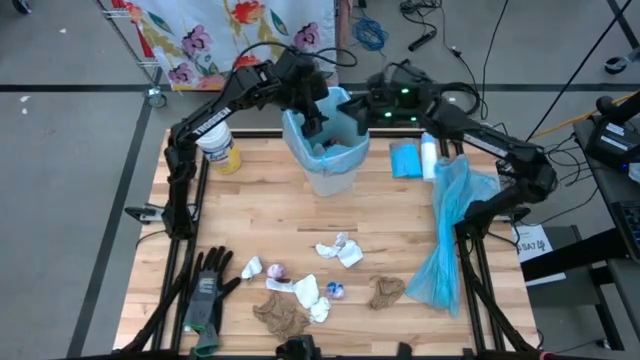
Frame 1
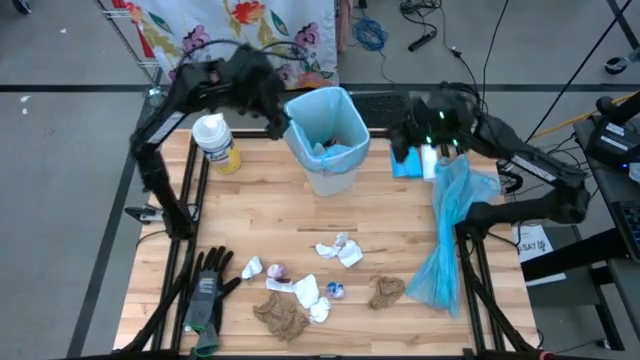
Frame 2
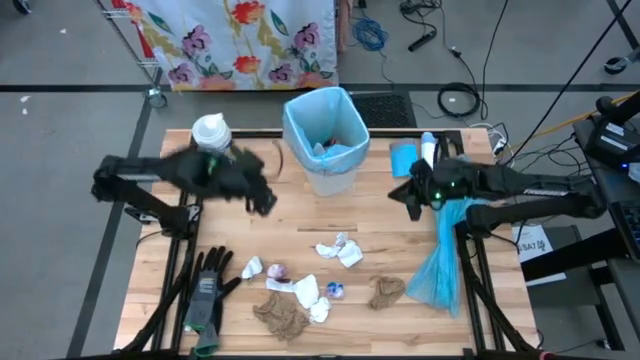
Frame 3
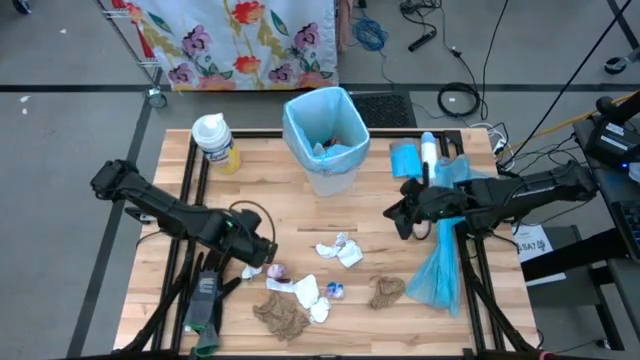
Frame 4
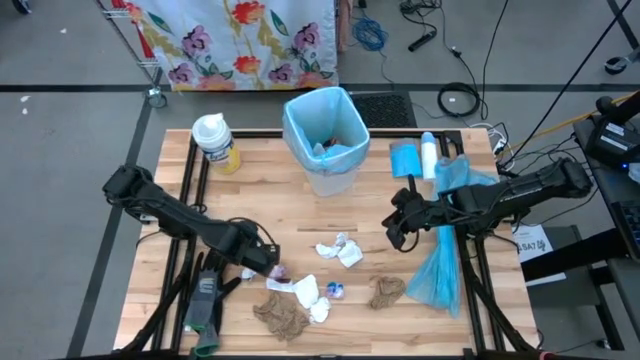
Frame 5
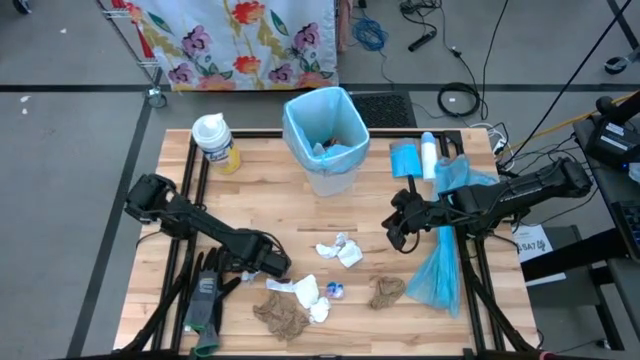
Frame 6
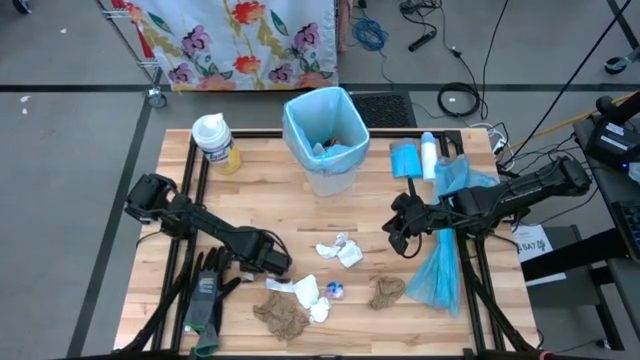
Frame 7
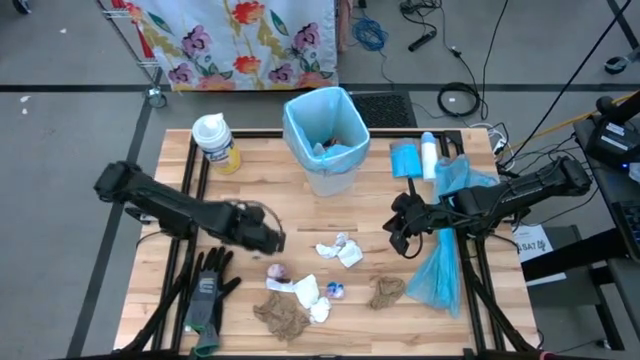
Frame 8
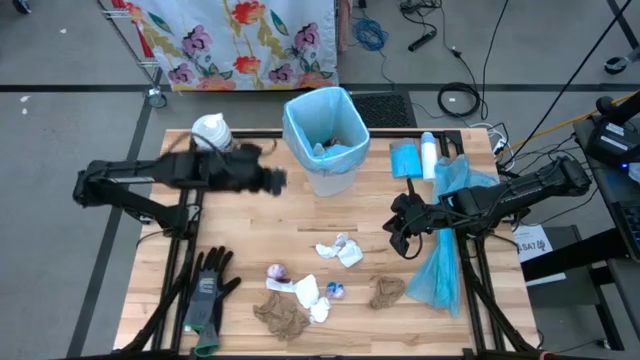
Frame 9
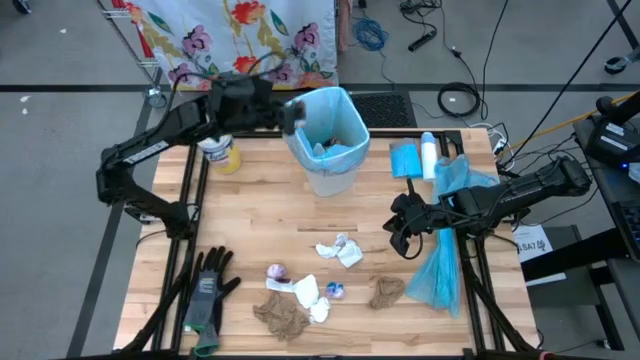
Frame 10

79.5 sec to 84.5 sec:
Task: place trash/remove bag and relplace
Put the white black paper into the trash bin

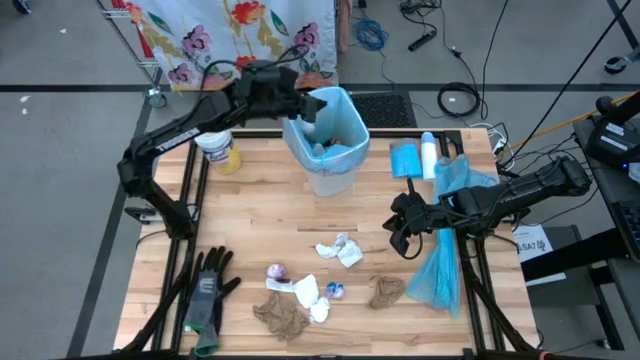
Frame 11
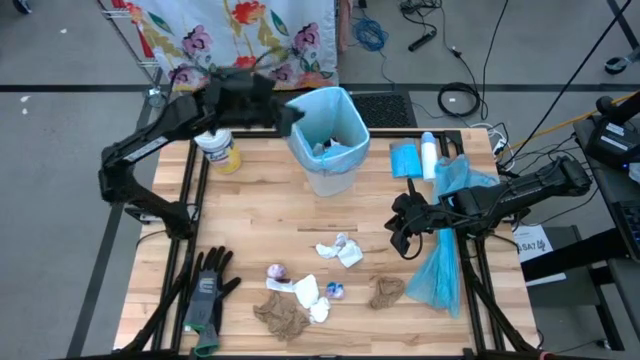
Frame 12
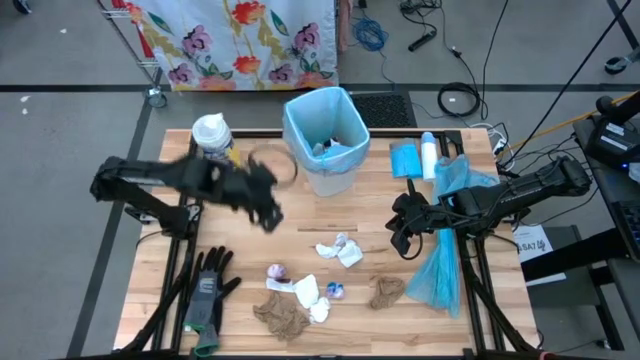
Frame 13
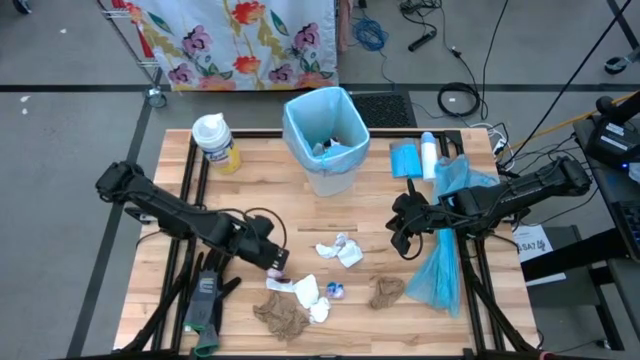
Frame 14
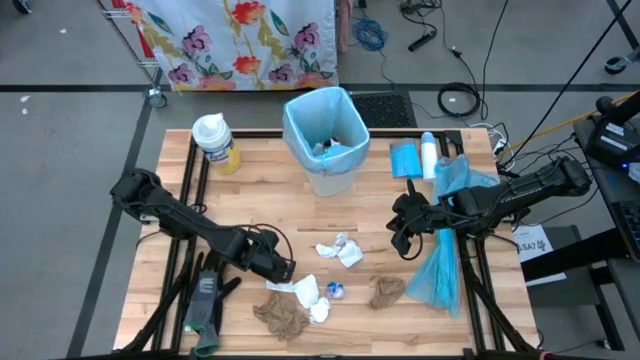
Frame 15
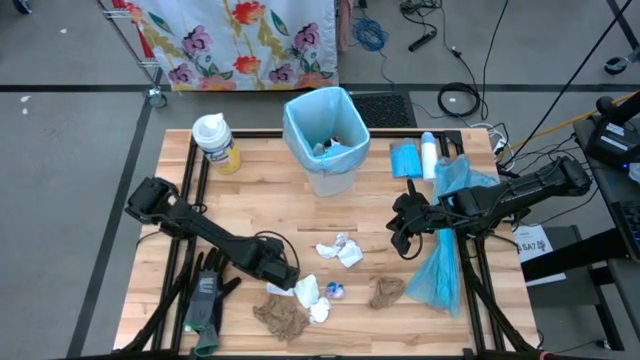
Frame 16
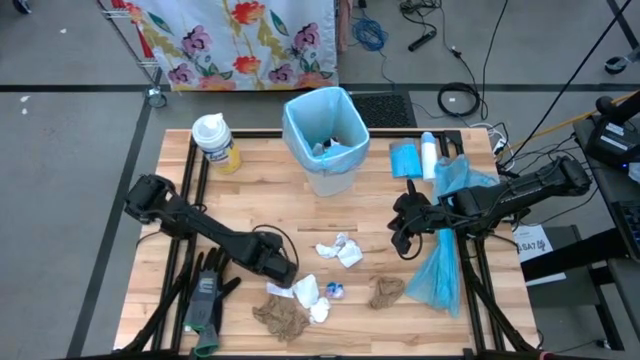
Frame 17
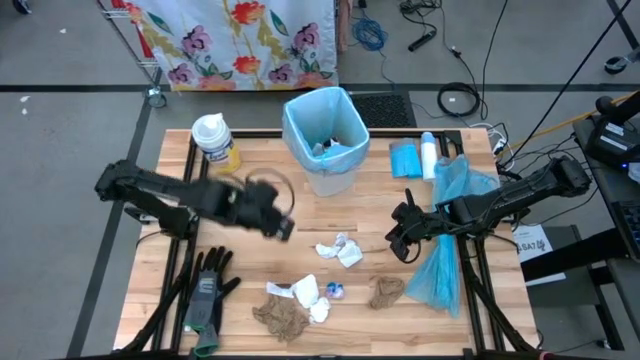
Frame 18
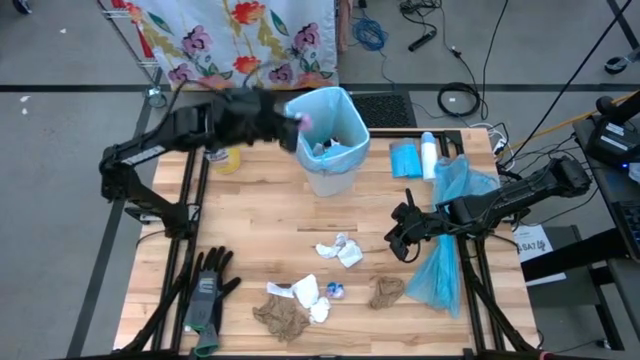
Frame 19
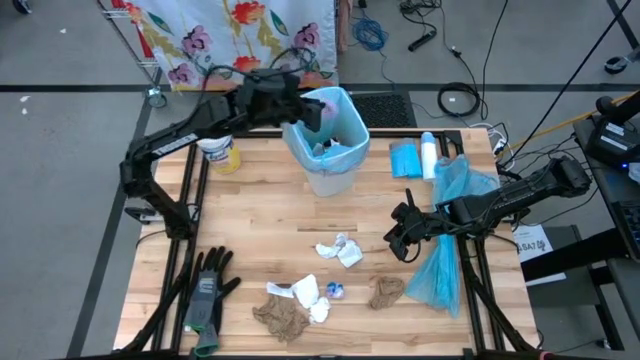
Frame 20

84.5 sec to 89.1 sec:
Put the pink plastic into the trash bin

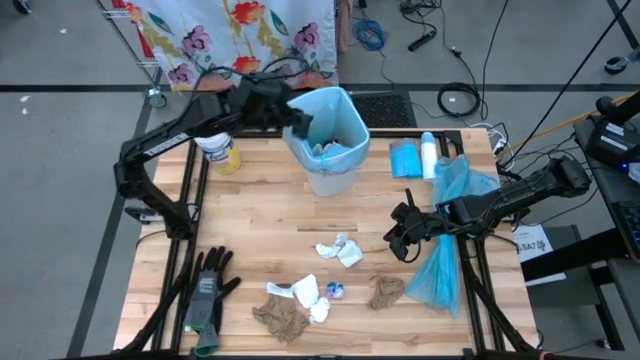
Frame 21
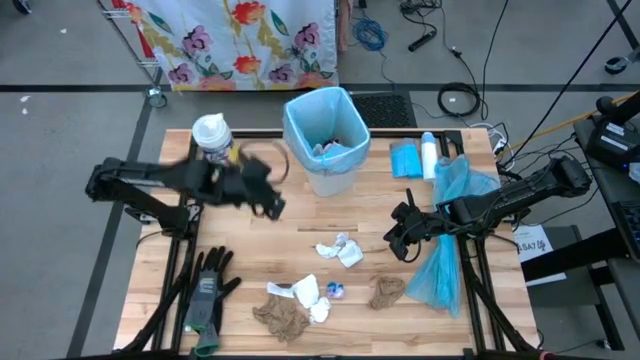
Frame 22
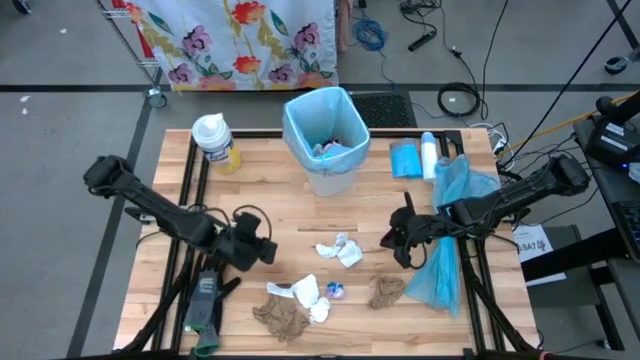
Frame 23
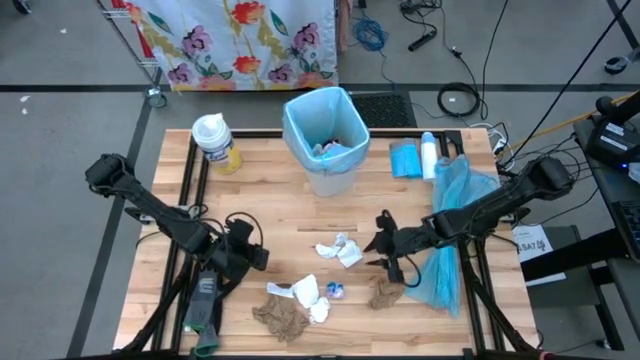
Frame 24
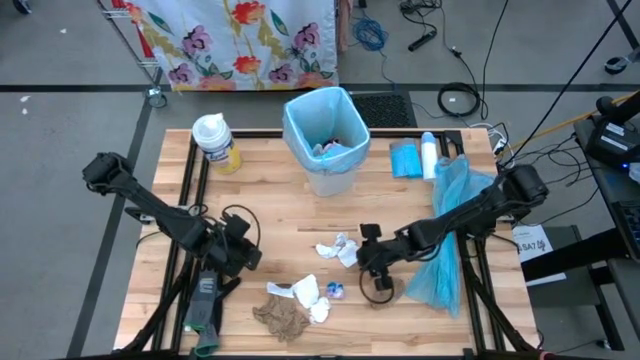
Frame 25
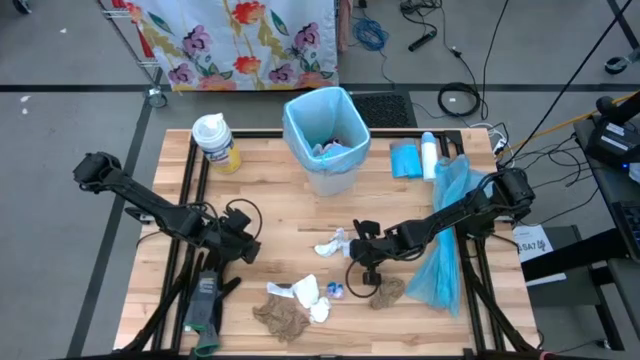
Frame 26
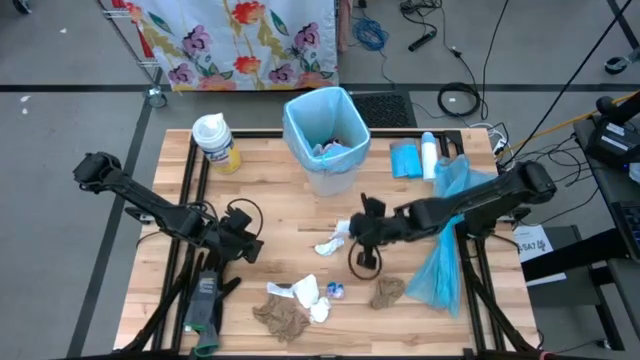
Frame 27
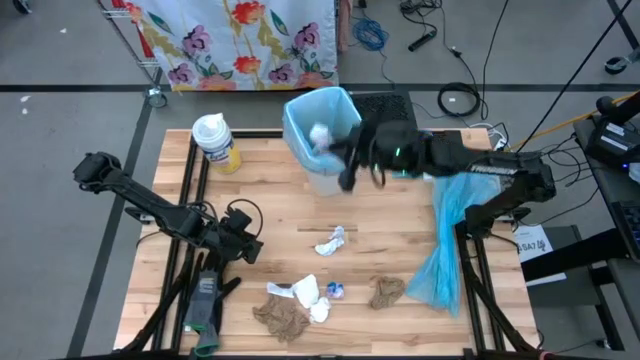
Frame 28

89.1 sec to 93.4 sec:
Put the white paper into the trash bin

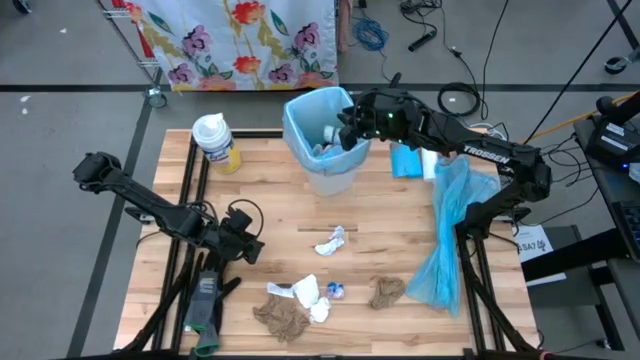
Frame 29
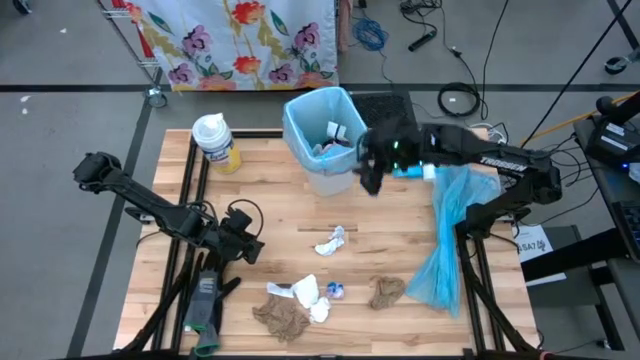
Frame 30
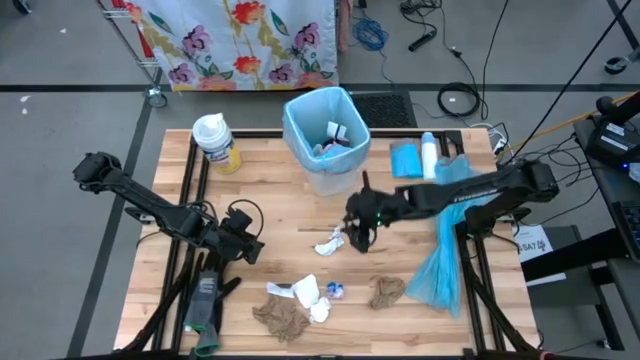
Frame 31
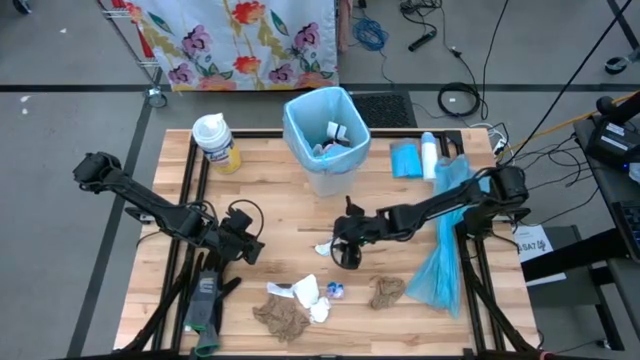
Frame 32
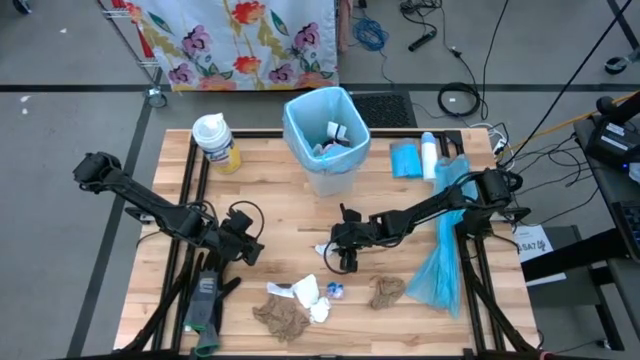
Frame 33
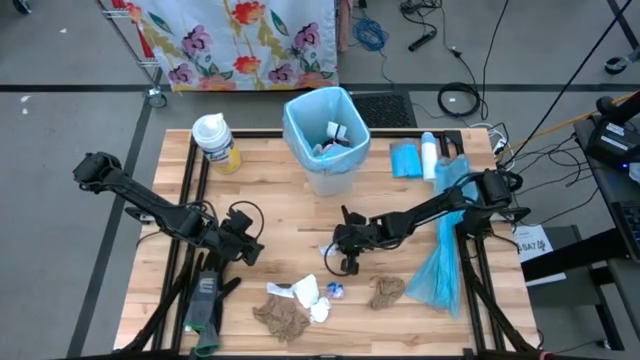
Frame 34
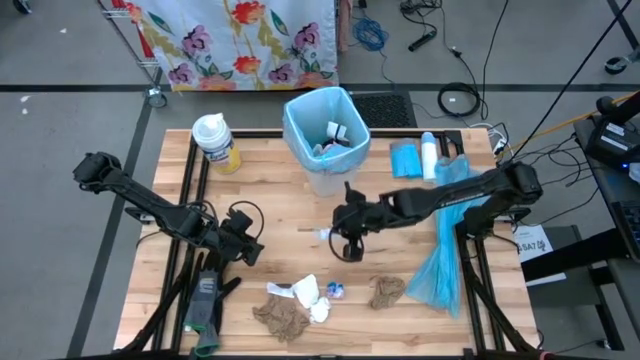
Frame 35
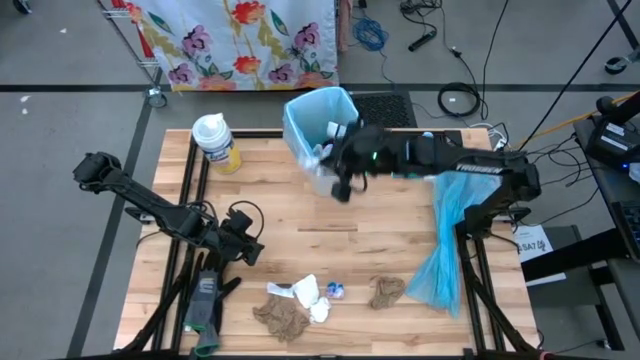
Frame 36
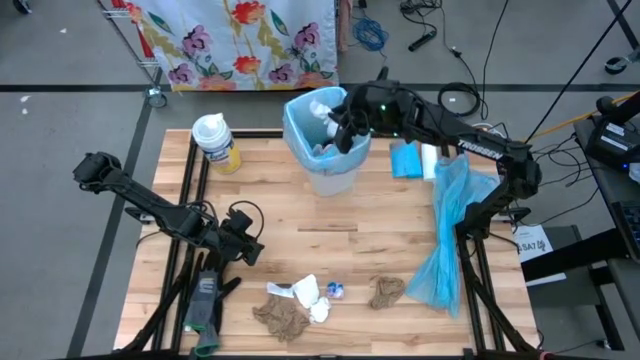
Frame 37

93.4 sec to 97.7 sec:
Put the white receipt paper into the trash bin

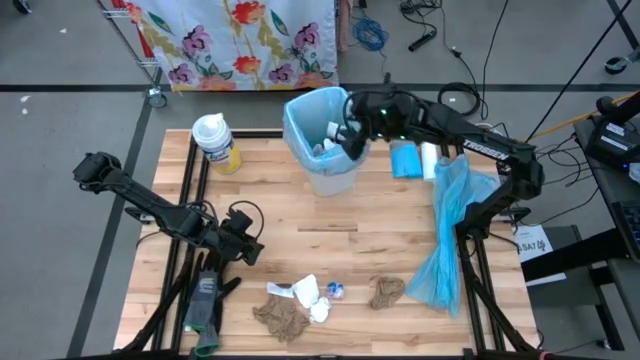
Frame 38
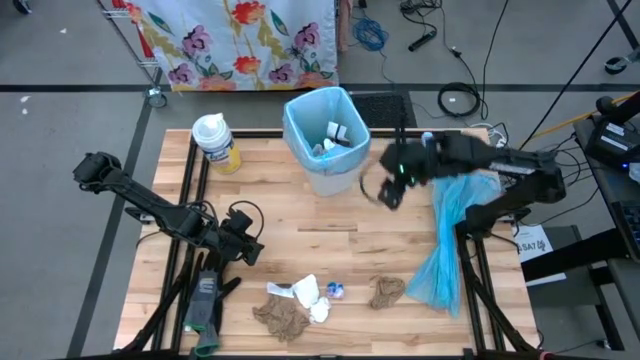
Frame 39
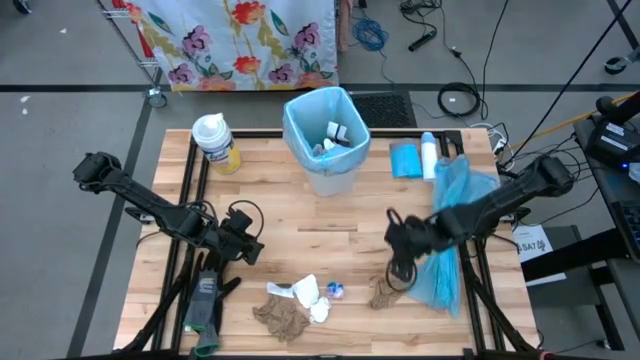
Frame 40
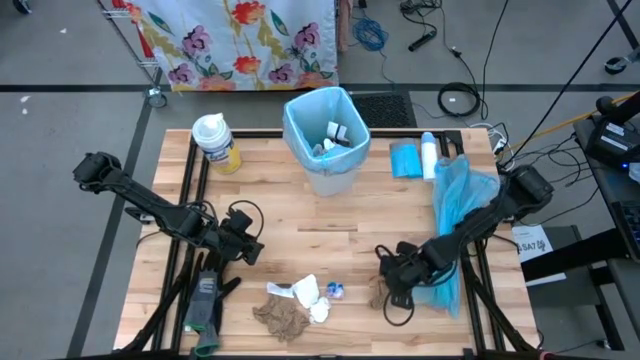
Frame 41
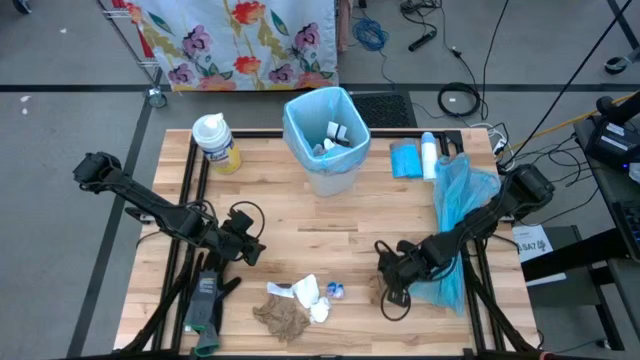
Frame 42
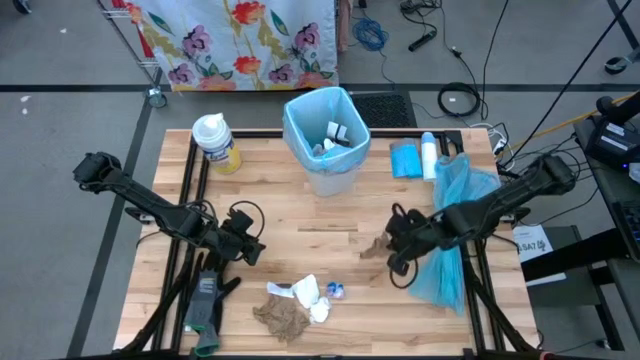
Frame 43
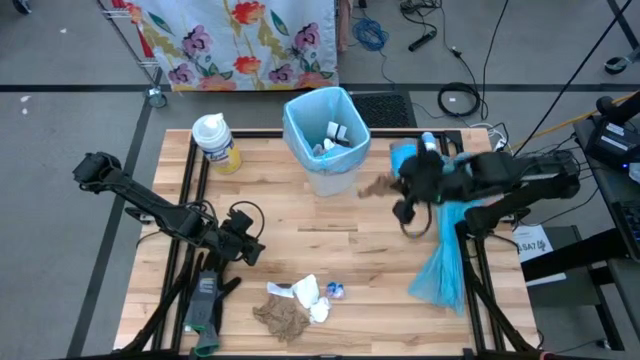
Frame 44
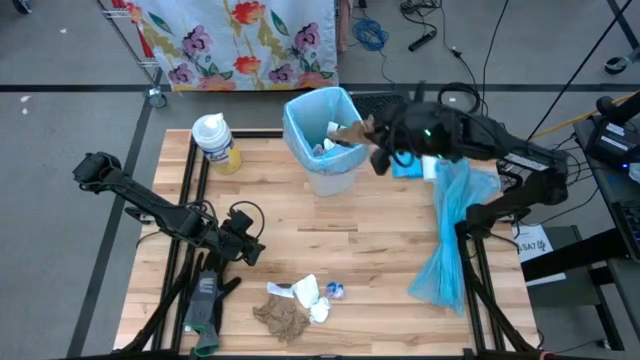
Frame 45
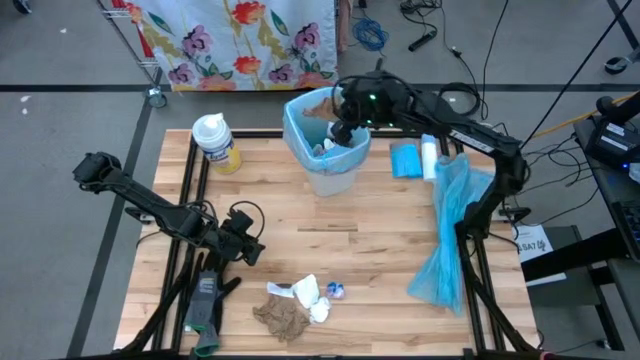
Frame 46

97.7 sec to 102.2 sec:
Put the brown napkin into the trash bin
